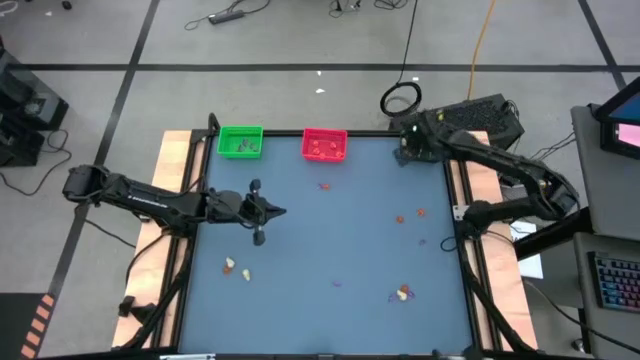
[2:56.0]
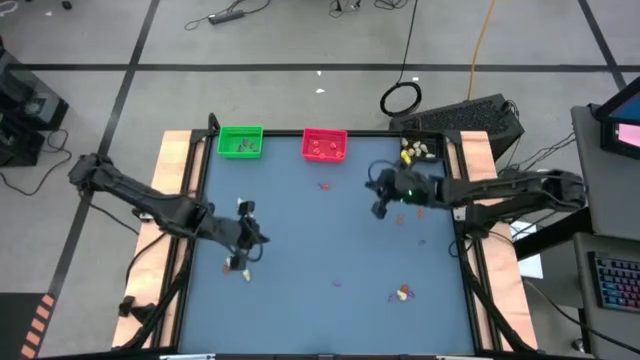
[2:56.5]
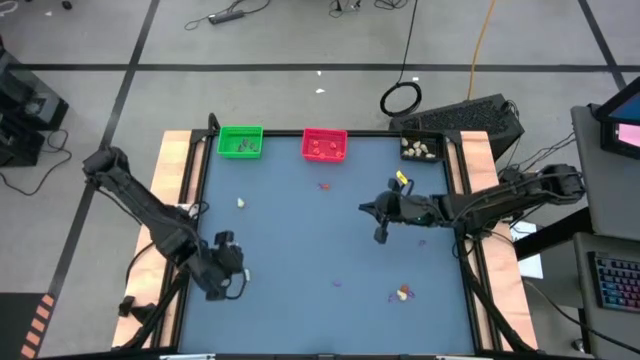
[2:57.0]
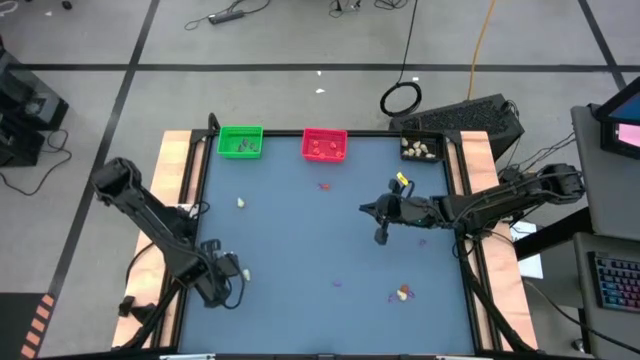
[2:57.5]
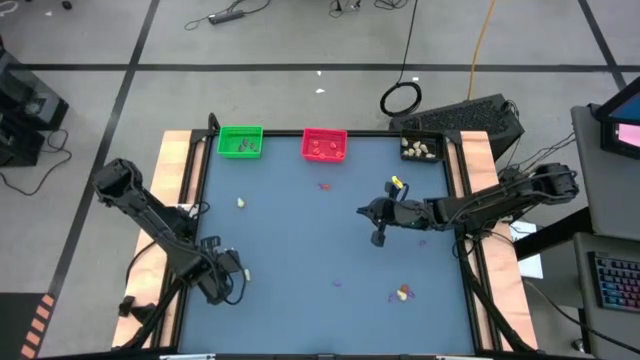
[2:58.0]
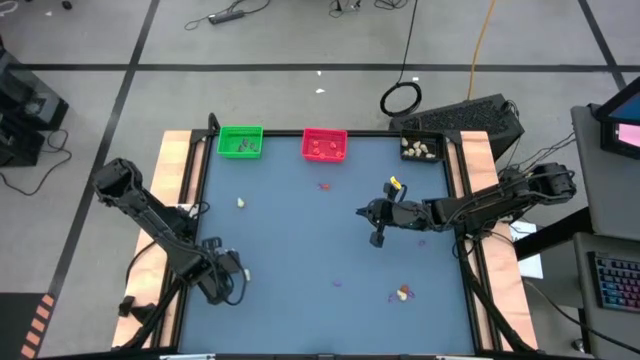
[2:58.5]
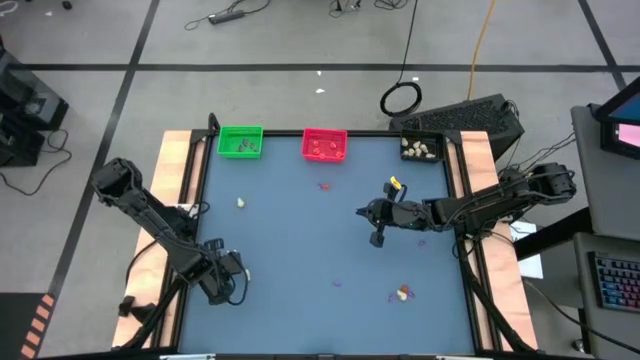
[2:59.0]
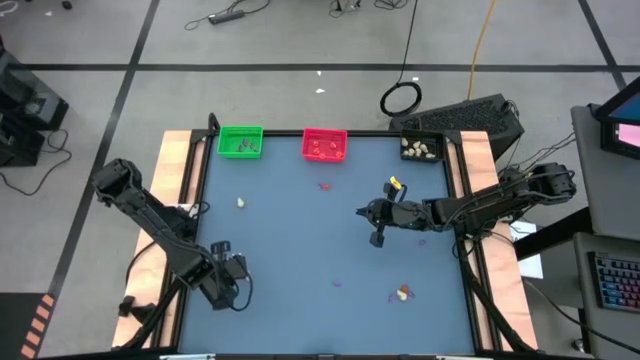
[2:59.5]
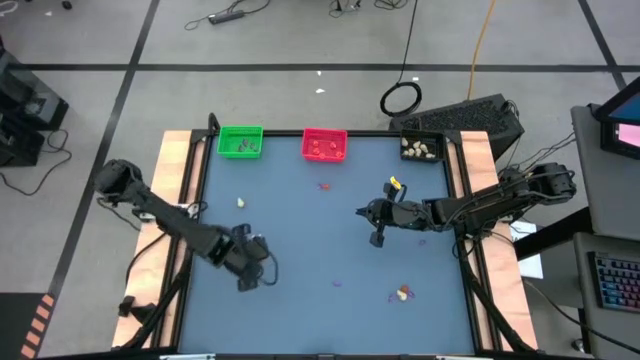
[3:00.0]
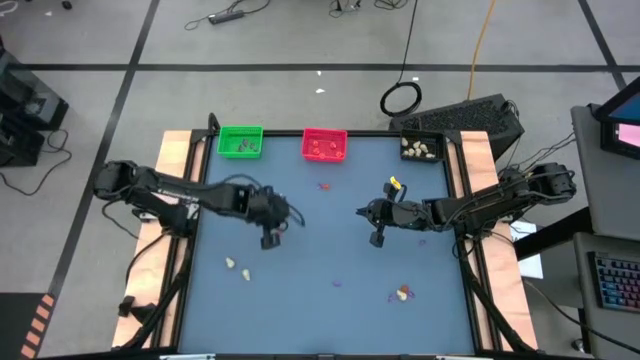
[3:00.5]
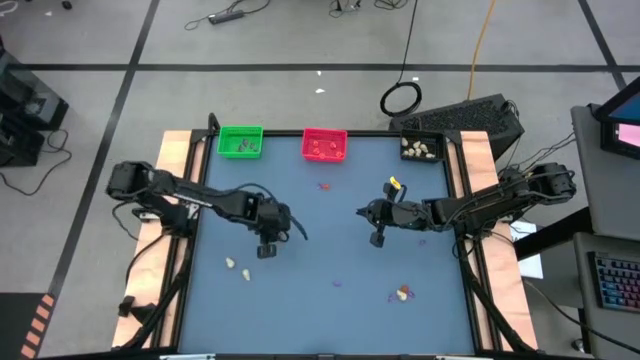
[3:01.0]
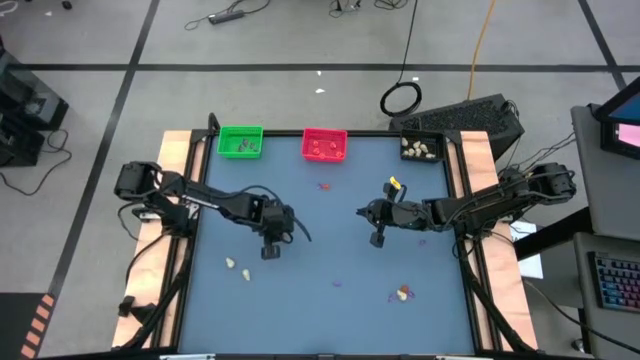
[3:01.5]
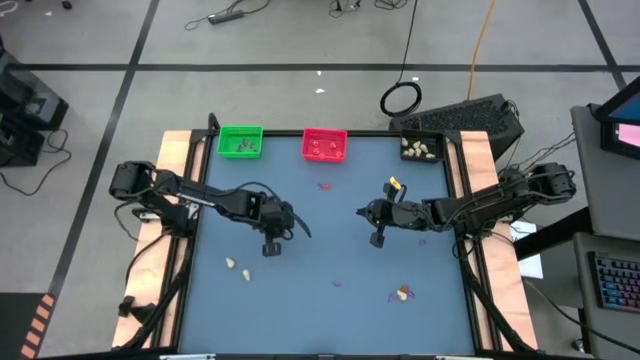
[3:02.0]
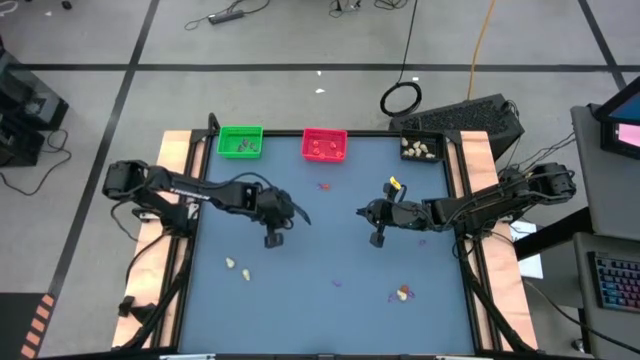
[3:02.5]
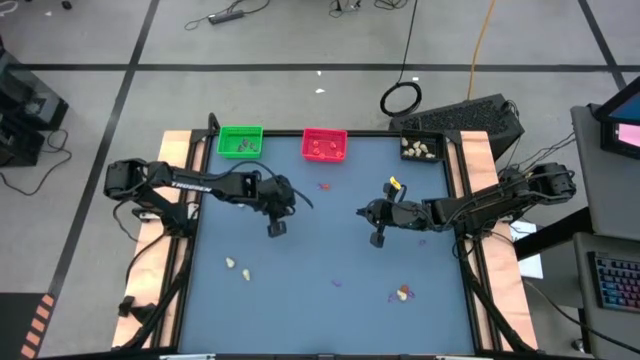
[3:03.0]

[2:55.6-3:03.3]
Task: Sort Halloween decoration
Put the orange pumpkin toy into the red bin

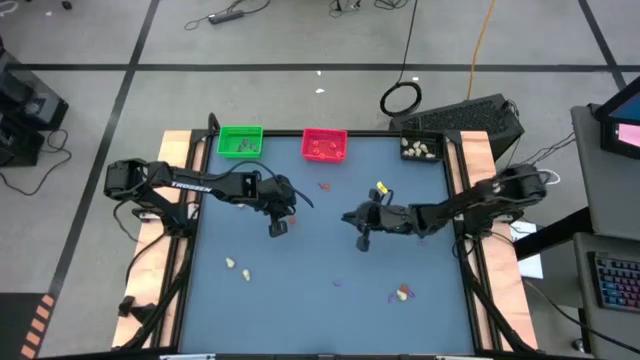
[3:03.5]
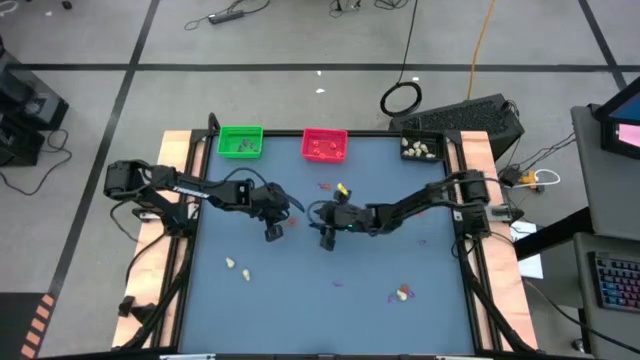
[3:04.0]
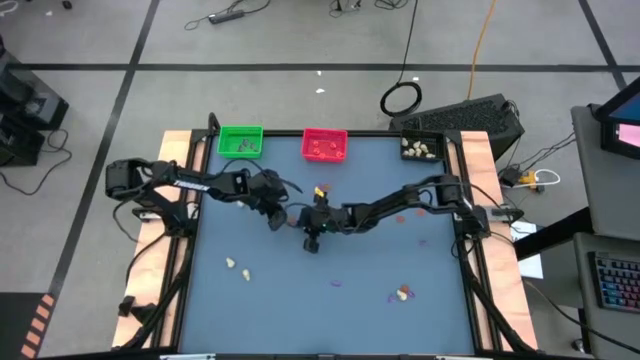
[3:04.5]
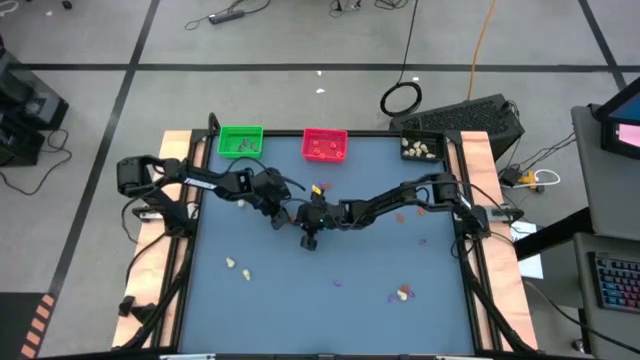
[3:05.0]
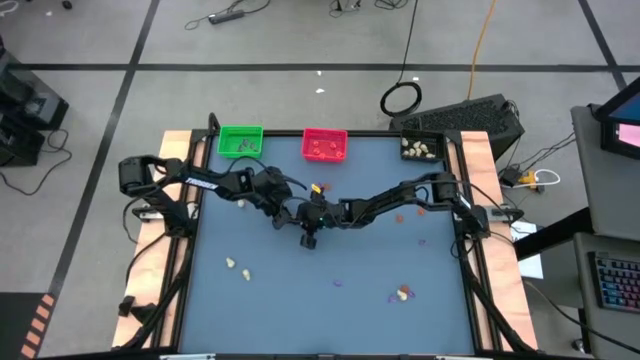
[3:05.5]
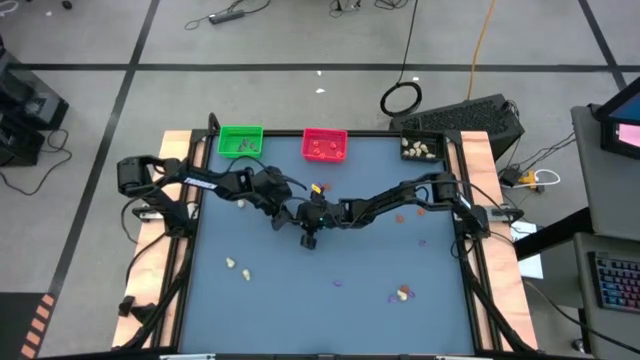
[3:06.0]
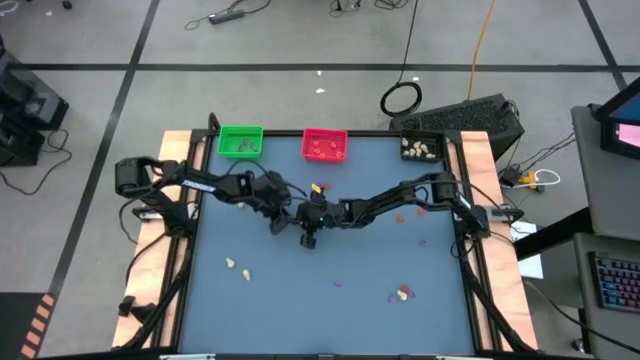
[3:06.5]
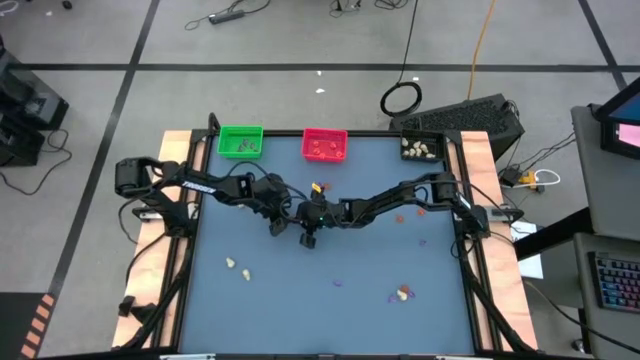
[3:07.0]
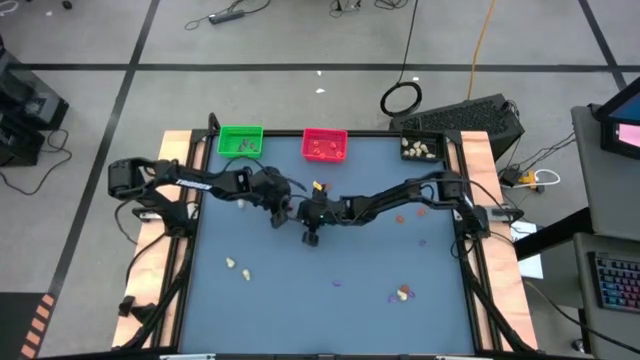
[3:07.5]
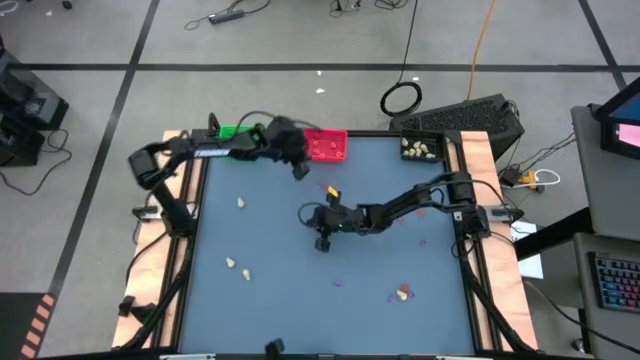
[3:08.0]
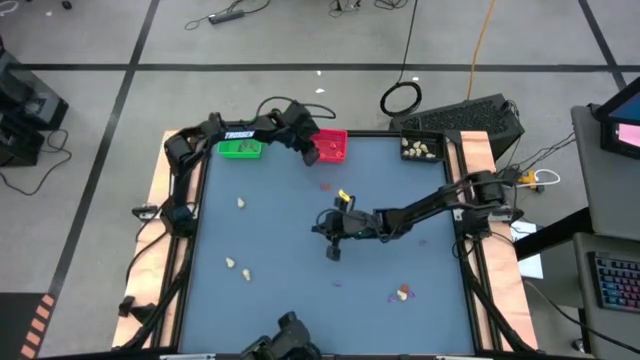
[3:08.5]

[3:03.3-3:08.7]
Put the orange pumpkin toy into the red bin

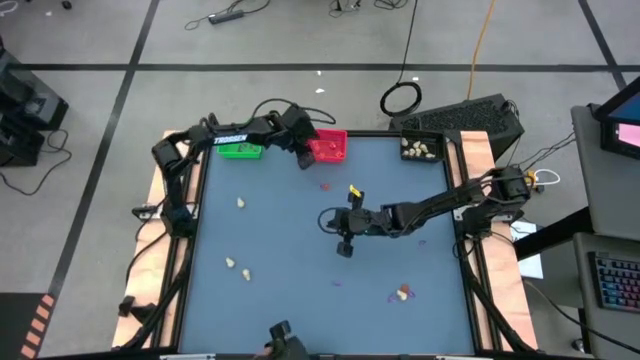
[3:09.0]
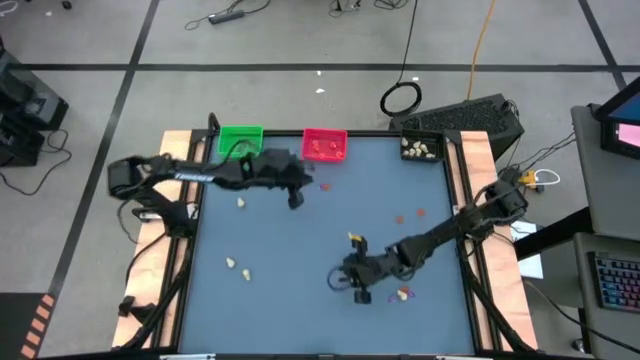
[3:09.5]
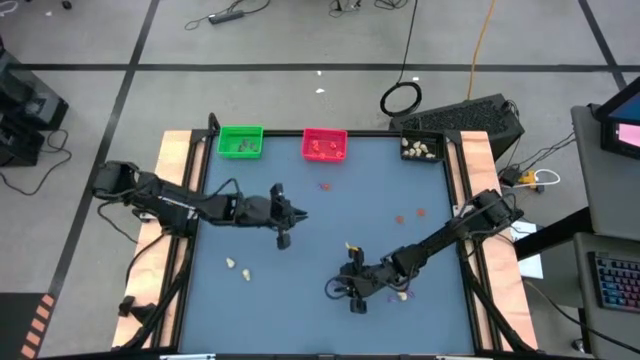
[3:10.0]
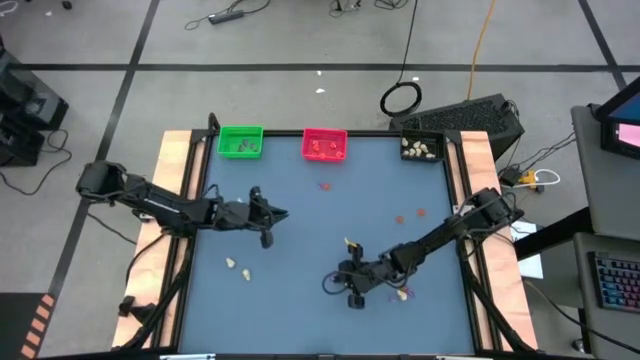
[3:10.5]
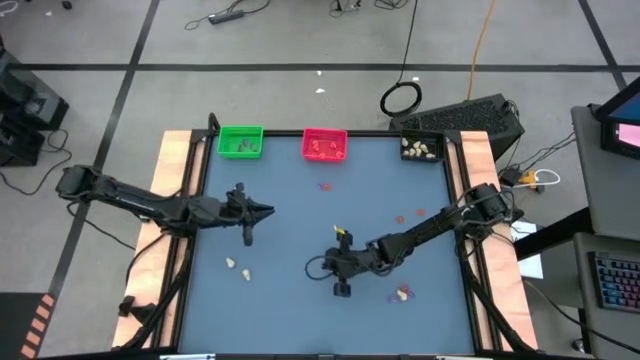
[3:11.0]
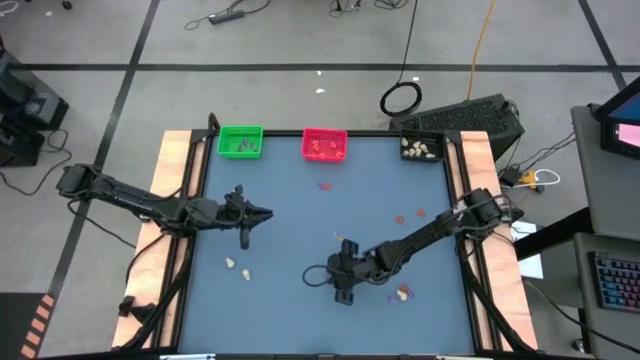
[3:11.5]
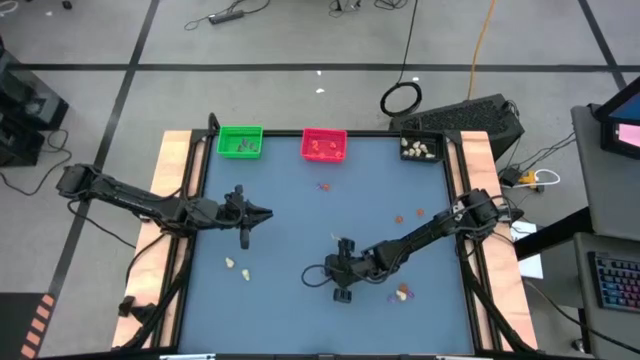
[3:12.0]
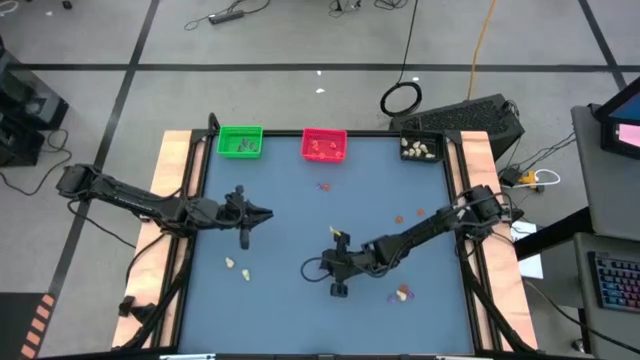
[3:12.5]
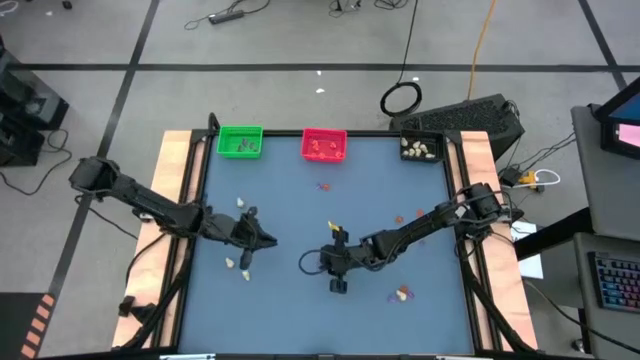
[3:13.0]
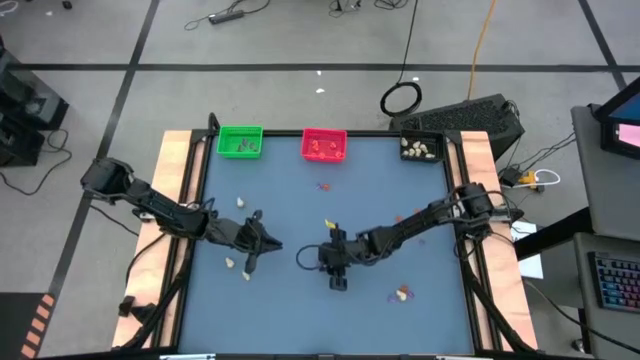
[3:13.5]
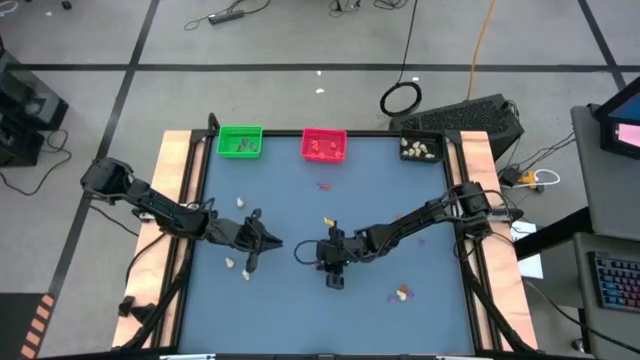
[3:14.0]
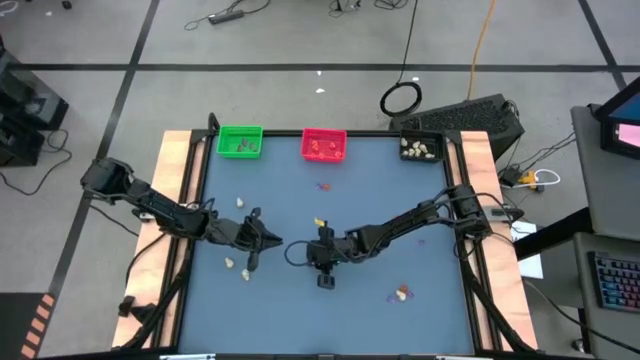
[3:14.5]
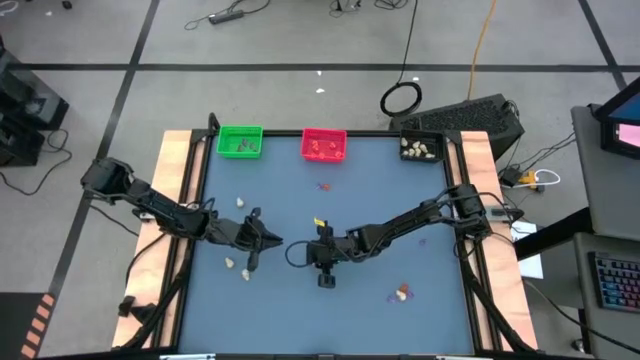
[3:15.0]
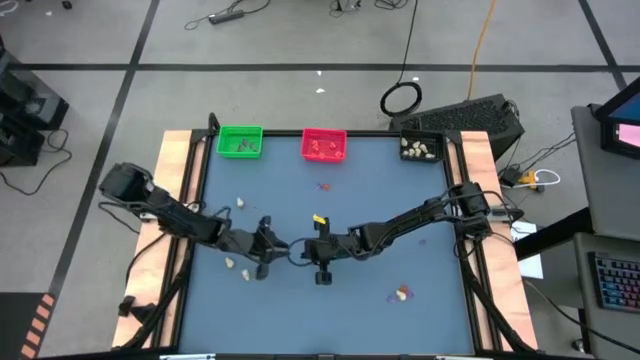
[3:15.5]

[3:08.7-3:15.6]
Put the purple witch hat toy into the green bin

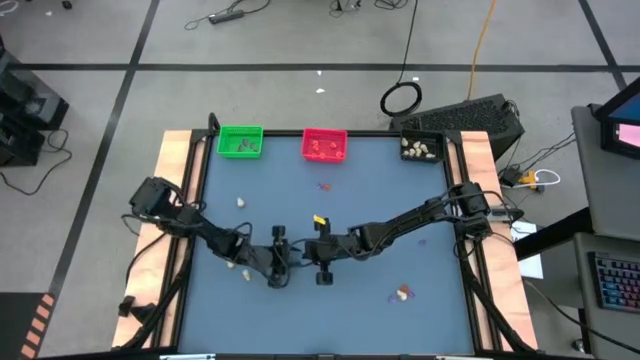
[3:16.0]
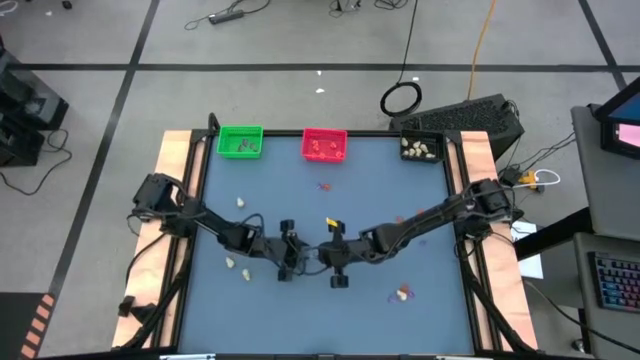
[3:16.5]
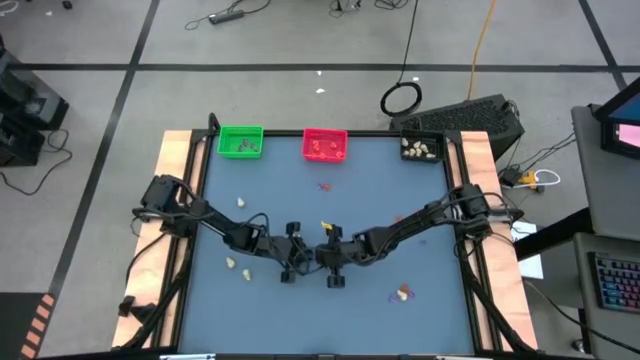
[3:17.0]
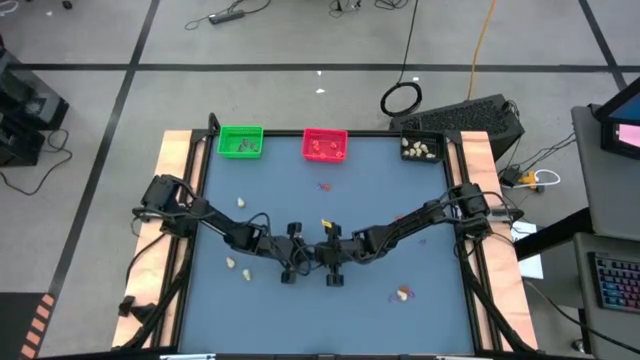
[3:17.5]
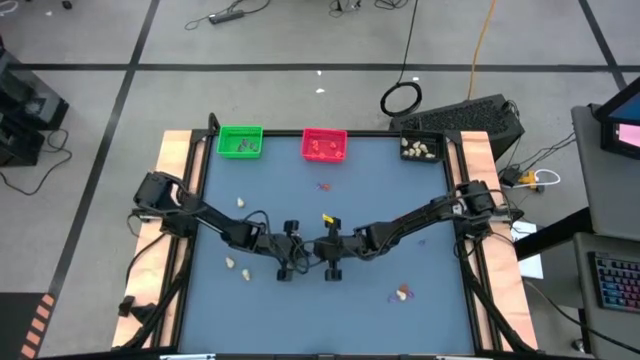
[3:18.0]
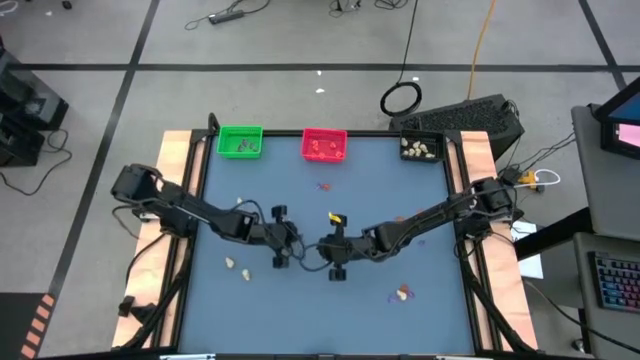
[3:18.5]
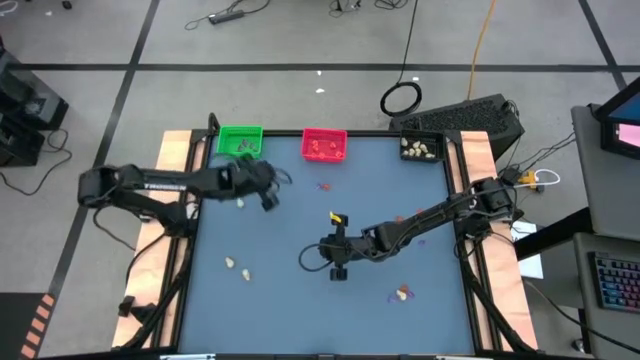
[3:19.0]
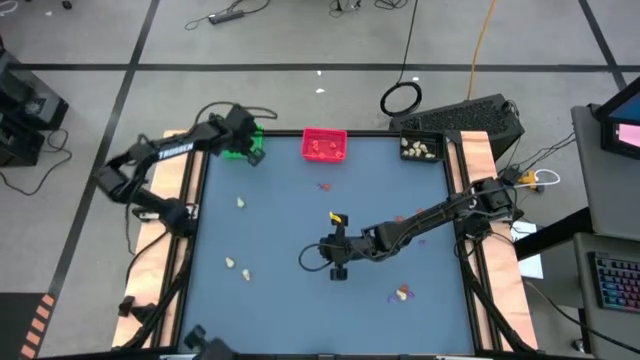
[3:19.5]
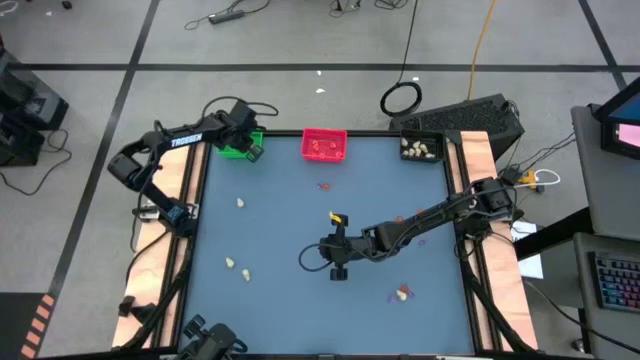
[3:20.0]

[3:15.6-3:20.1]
Put the purple witch hat toy into the green bin
